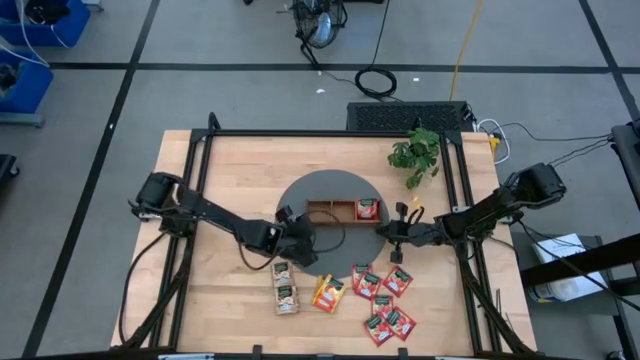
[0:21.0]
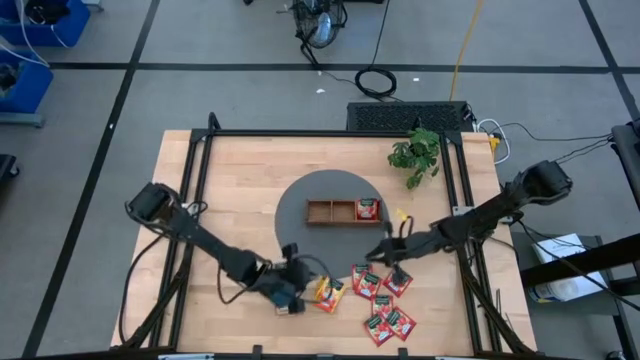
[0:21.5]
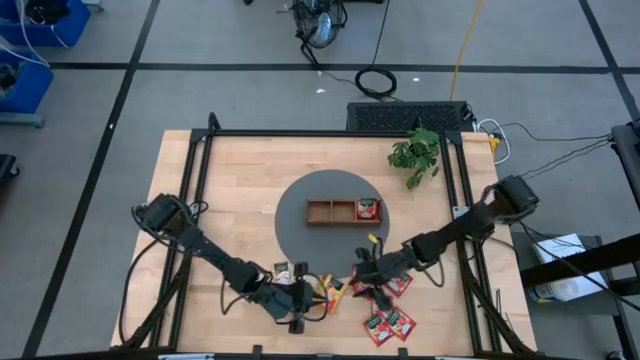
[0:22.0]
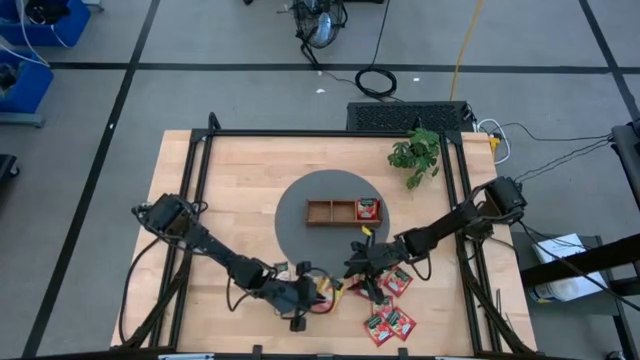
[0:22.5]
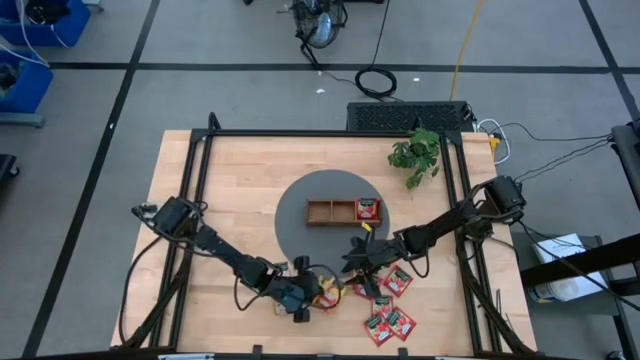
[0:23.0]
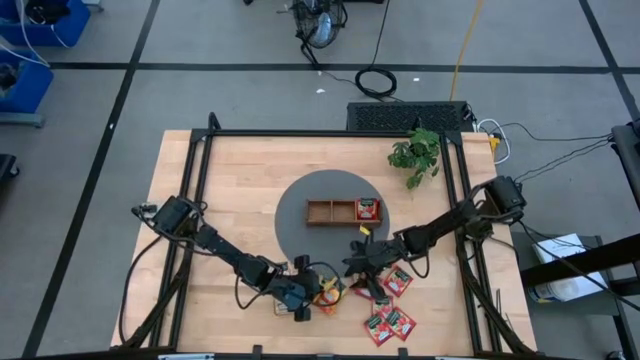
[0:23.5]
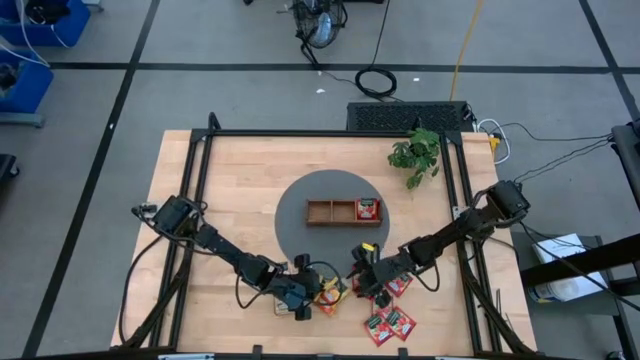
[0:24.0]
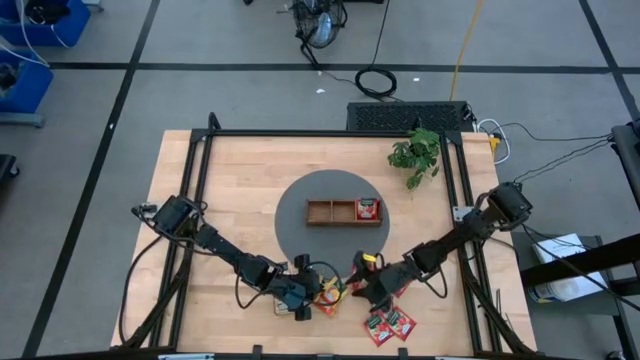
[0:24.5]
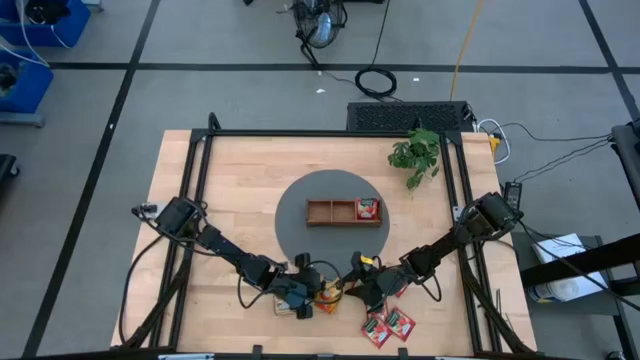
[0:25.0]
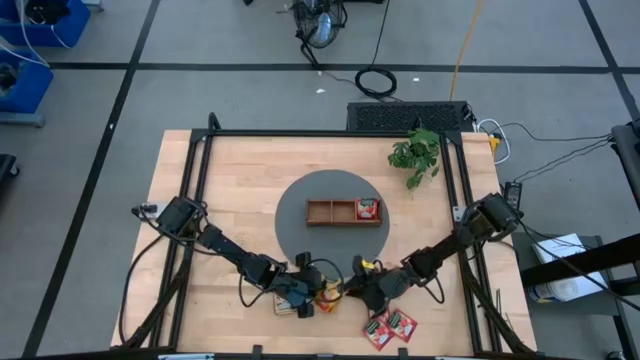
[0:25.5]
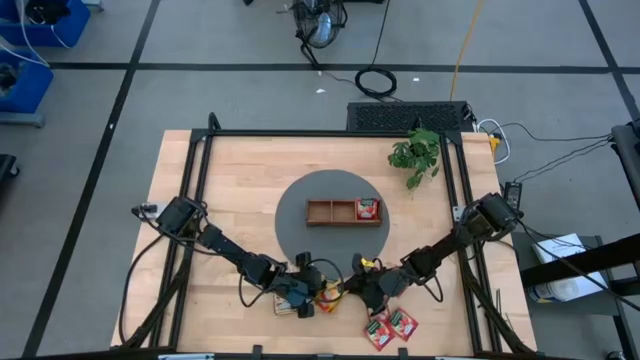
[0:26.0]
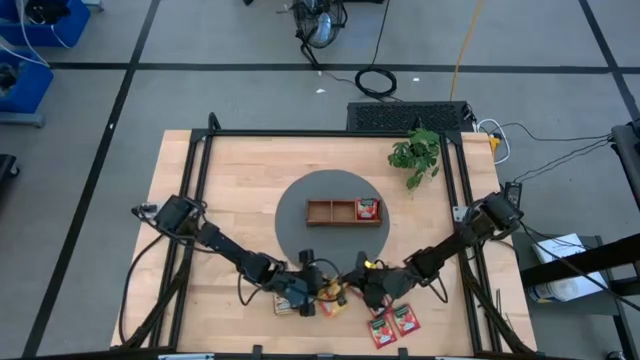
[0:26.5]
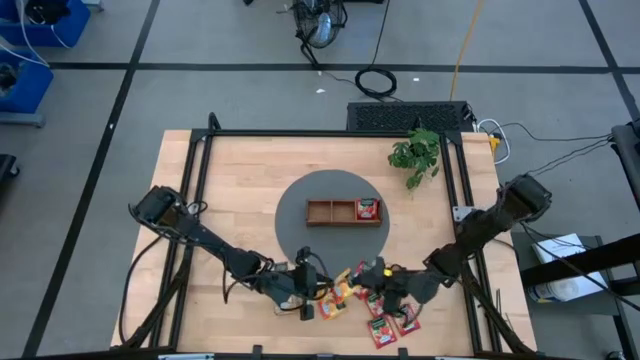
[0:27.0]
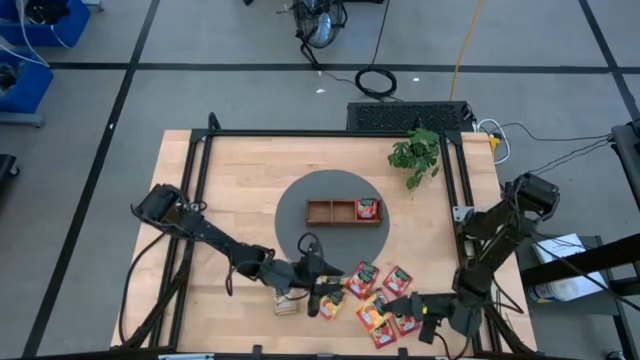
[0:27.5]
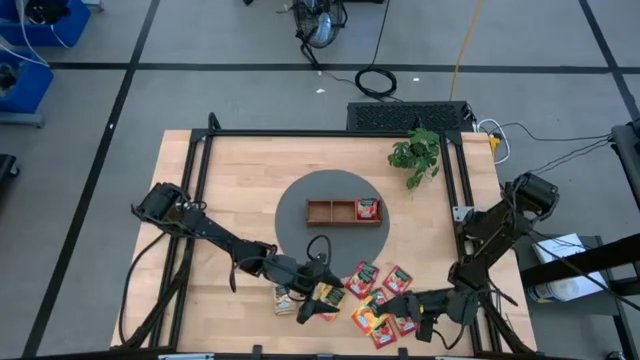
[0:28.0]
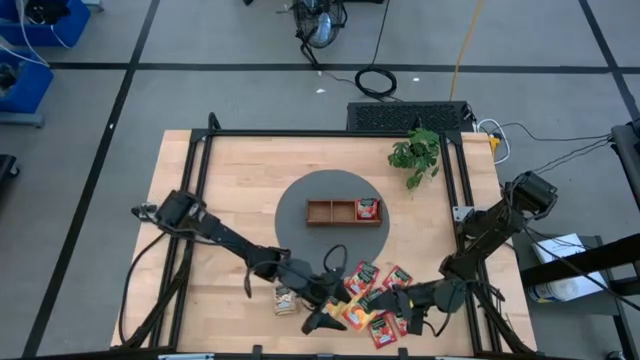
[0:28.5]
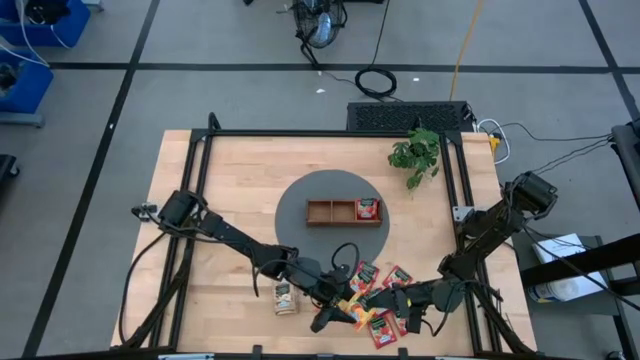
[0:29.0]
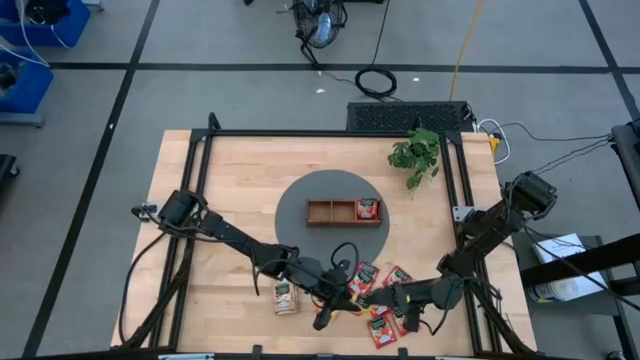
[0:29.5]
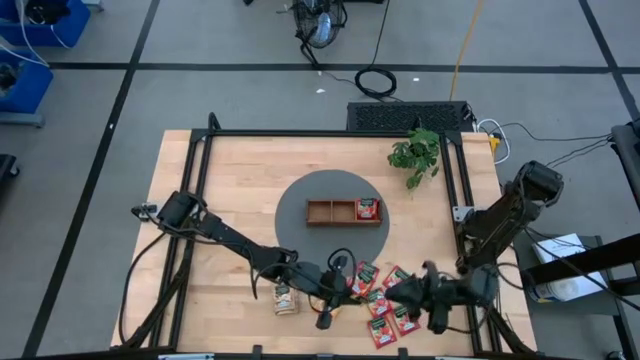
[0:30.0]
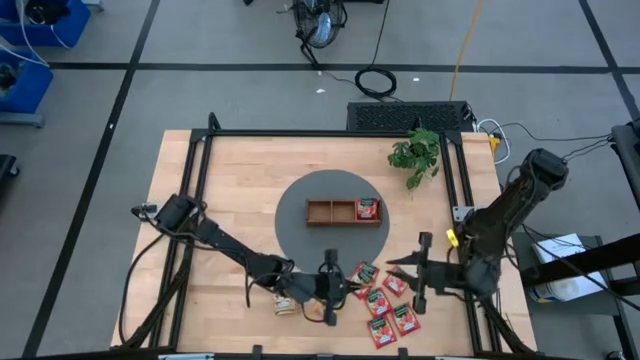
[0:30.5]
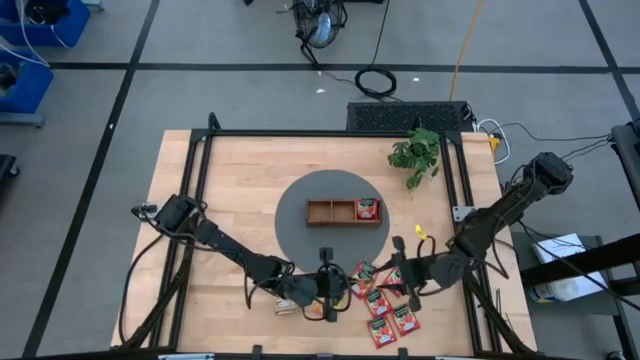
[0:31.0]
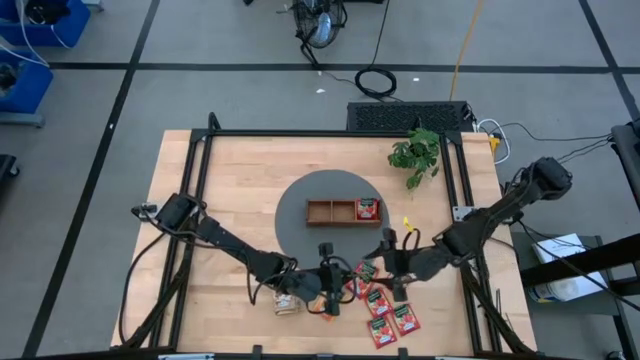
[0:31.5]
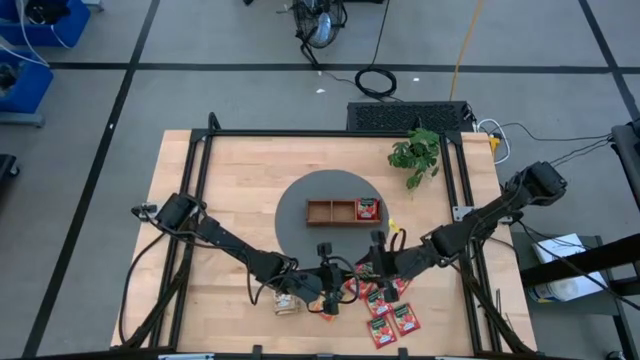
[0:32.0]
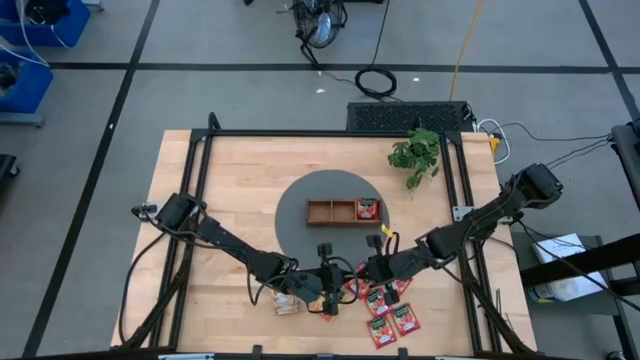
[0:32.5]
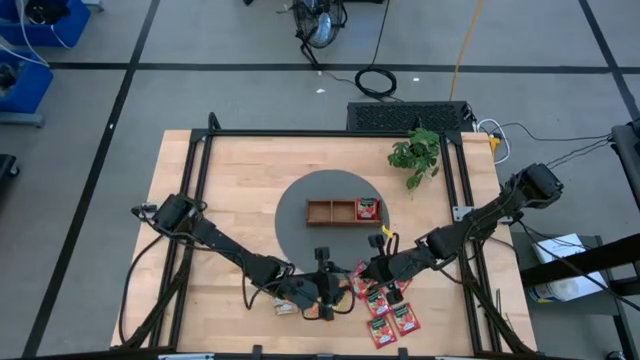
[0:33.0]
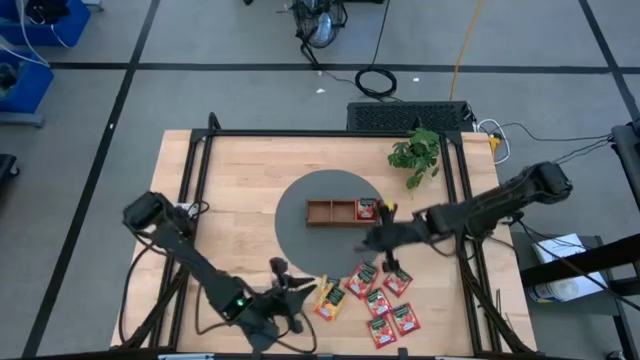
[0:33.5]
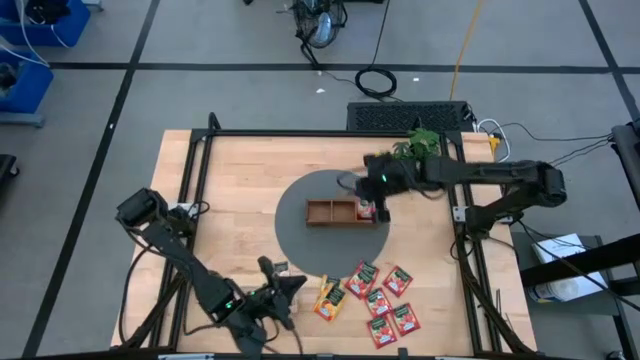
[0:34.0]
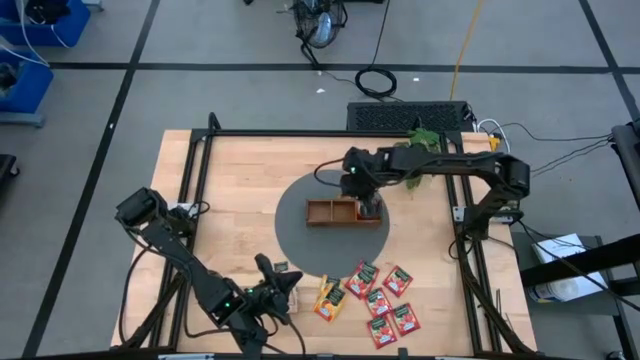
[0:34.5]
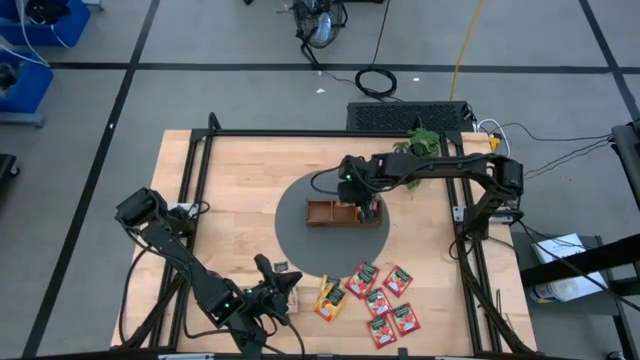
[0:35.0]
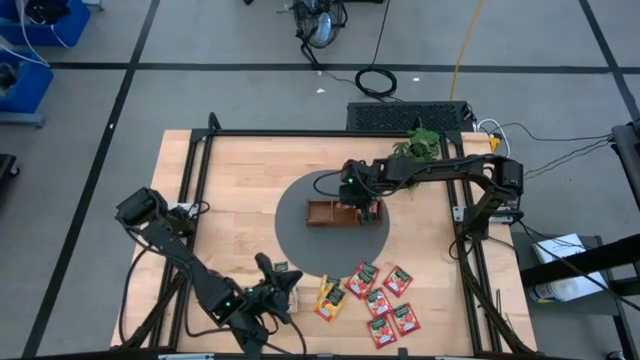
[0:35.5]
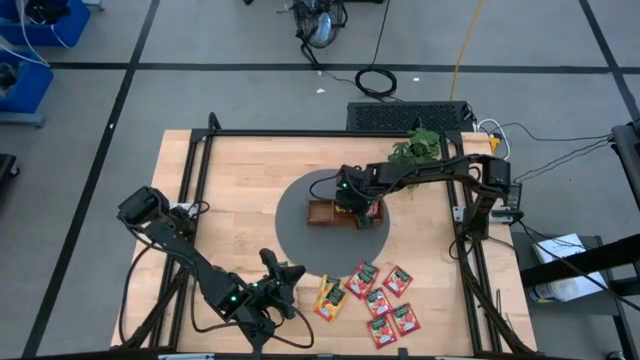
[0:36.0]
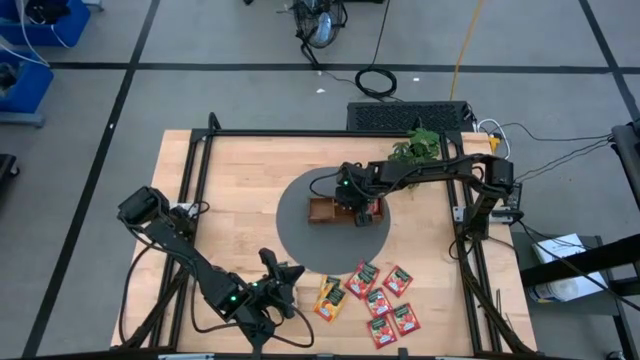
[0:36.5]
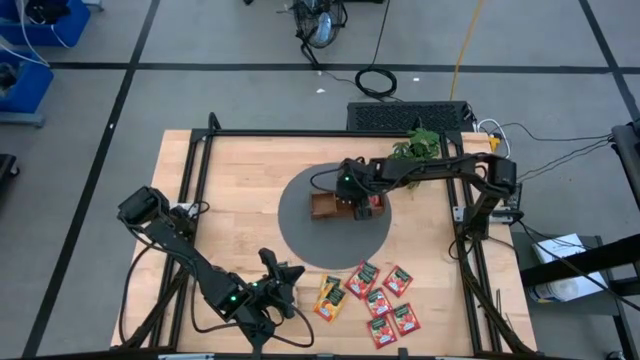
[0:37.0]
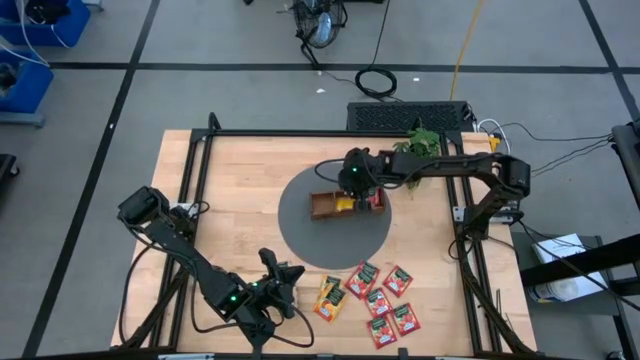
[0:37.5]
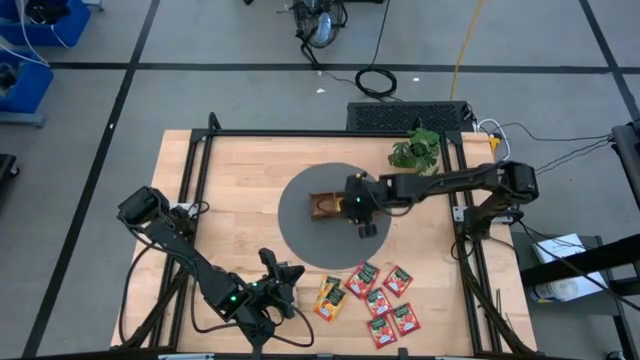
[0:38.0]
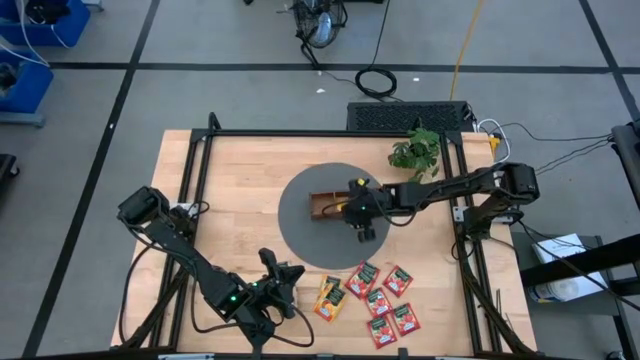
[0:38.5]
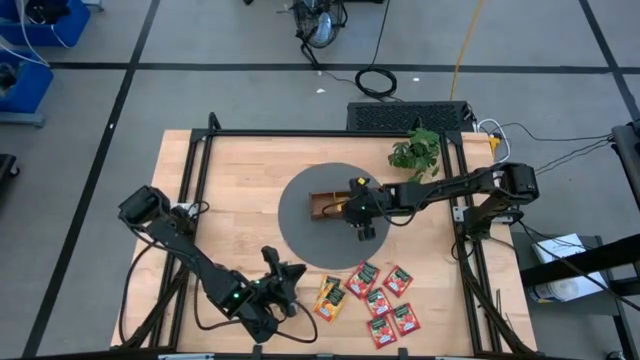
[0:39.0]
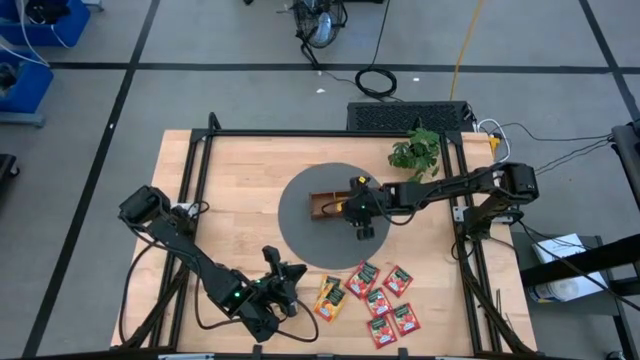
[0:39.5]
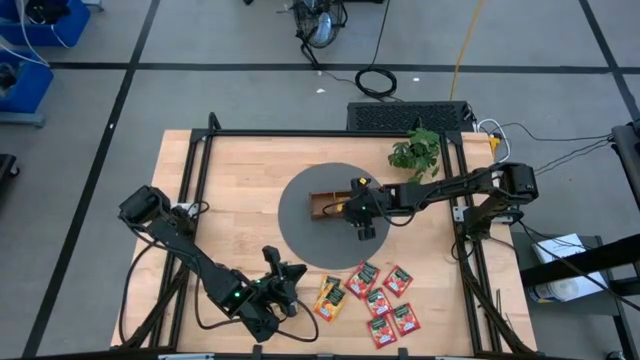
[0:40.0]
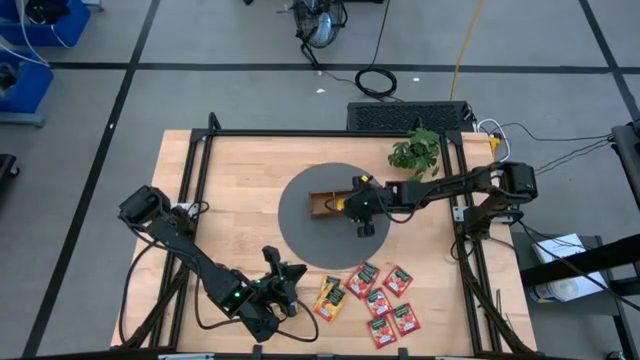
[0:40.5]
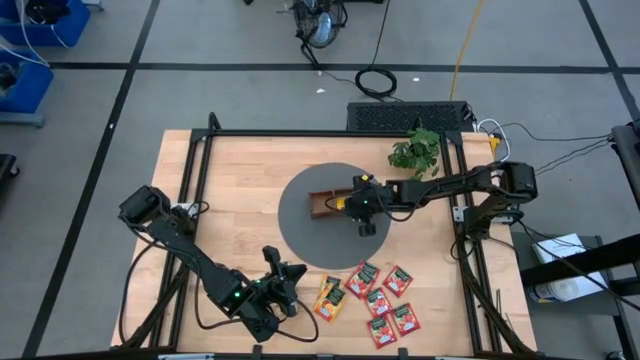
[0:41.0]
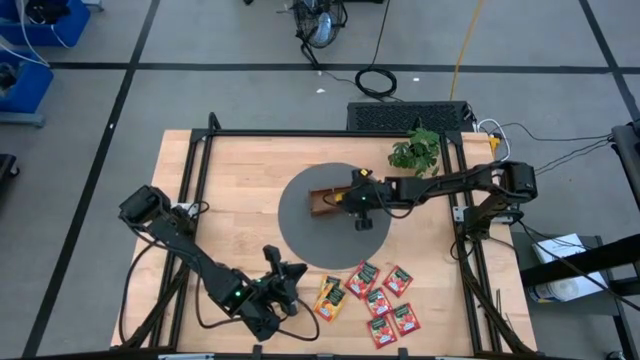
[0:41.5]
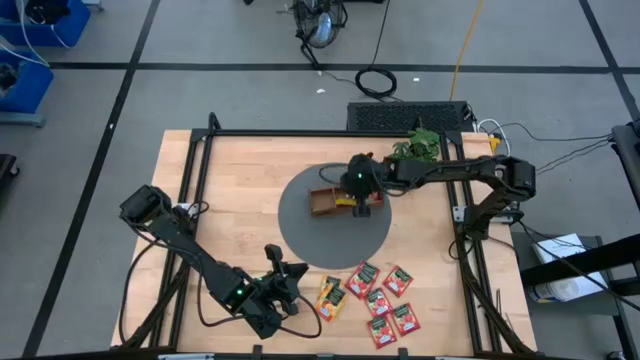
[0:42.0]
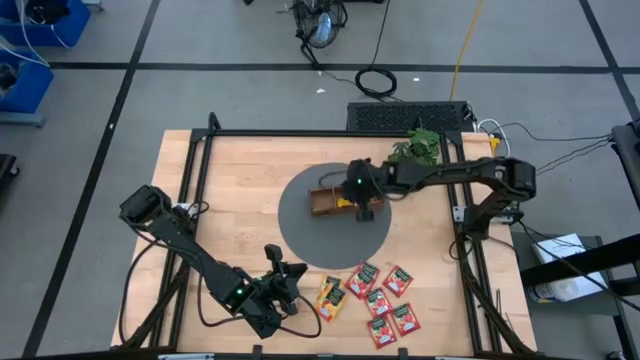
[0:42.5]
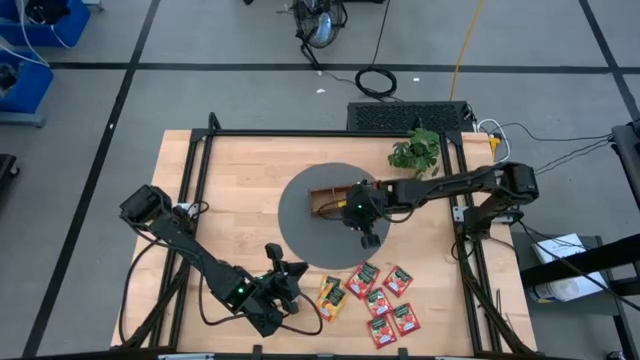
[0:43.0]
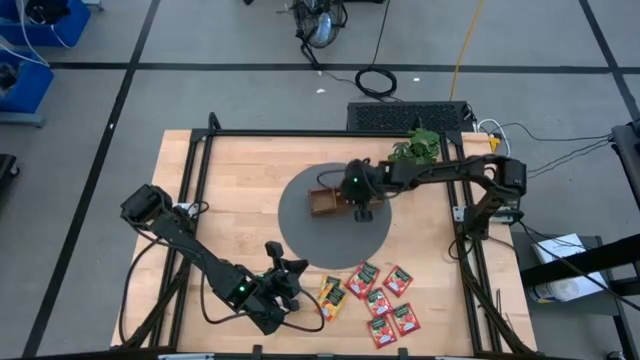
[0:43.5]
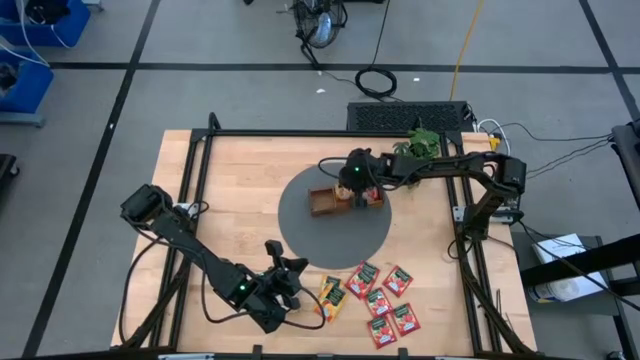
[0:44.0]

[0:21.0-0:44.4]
Task: Pick & Place Tea
Put the yellow tea bag into the middle compartment of the wooden organizer
